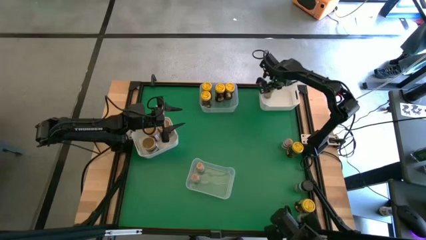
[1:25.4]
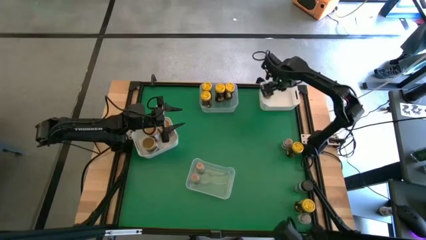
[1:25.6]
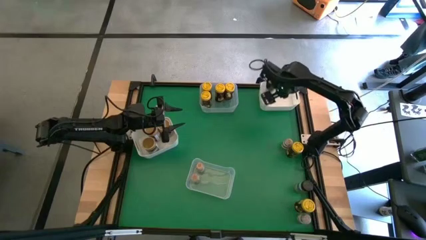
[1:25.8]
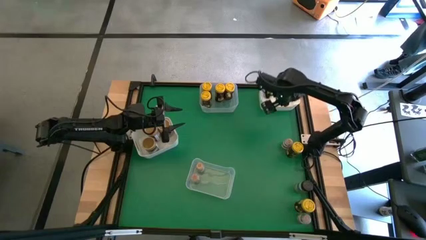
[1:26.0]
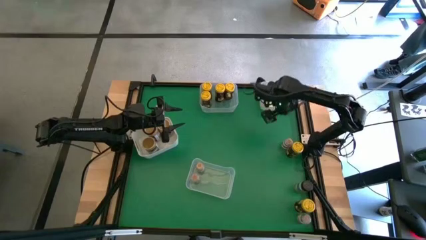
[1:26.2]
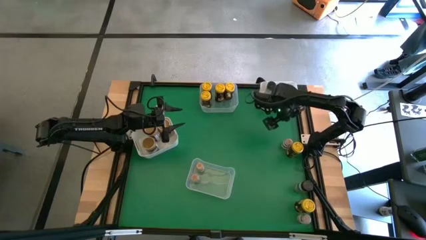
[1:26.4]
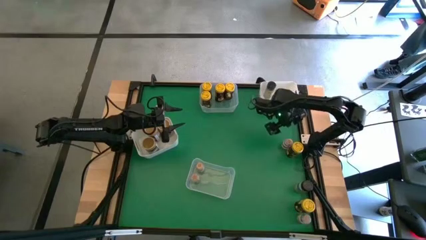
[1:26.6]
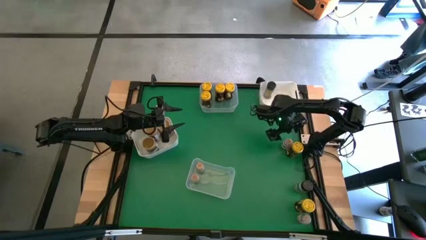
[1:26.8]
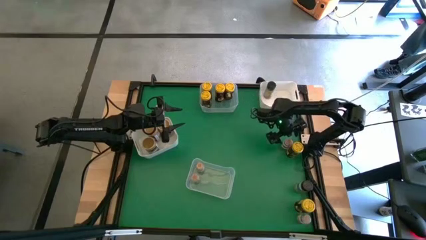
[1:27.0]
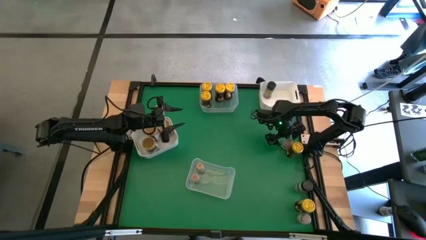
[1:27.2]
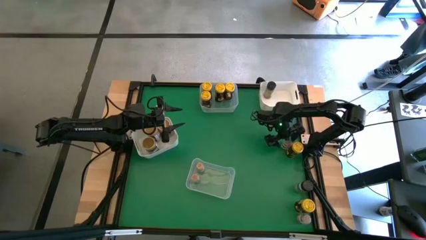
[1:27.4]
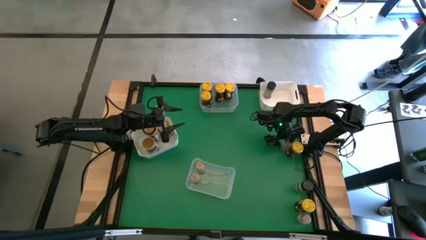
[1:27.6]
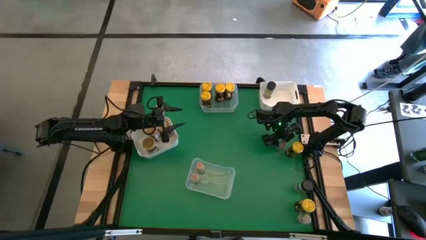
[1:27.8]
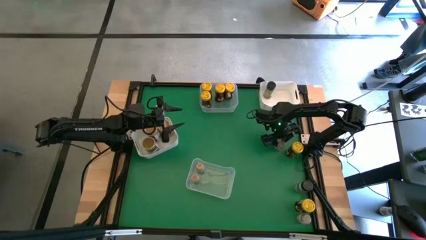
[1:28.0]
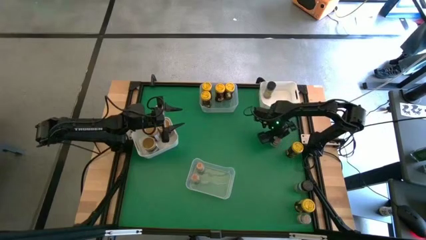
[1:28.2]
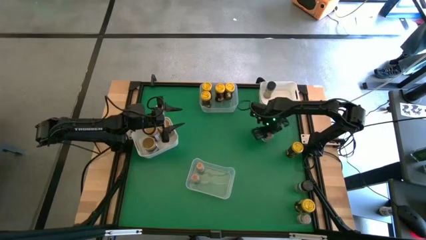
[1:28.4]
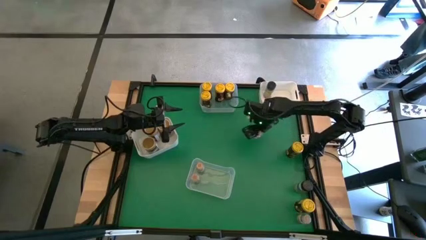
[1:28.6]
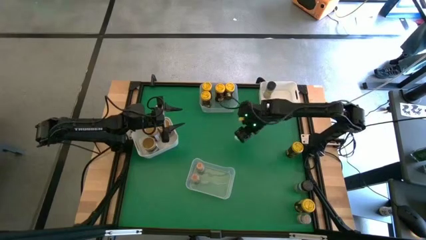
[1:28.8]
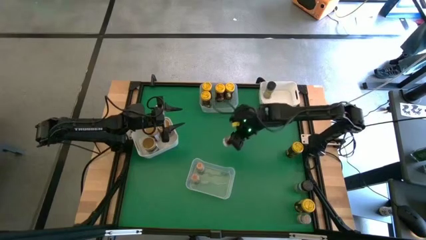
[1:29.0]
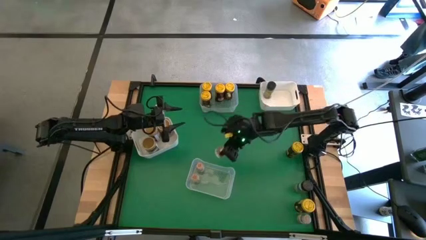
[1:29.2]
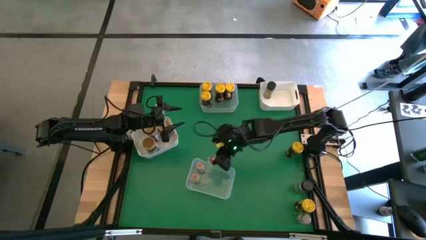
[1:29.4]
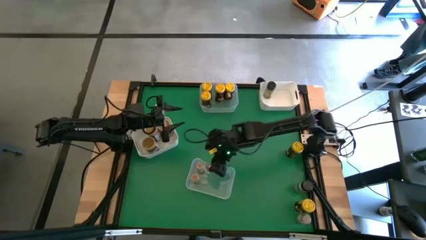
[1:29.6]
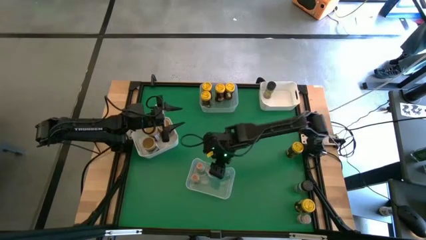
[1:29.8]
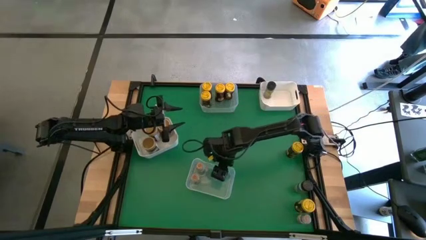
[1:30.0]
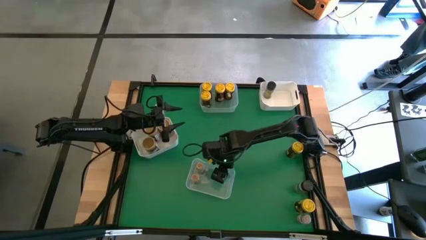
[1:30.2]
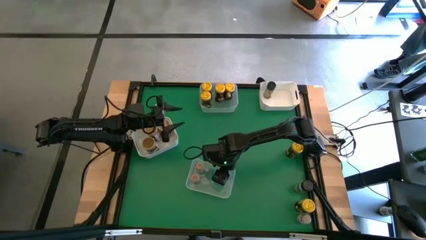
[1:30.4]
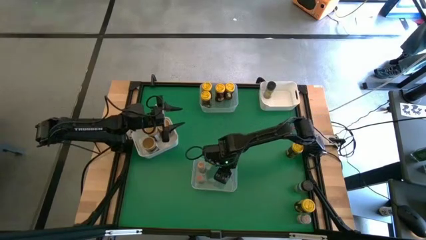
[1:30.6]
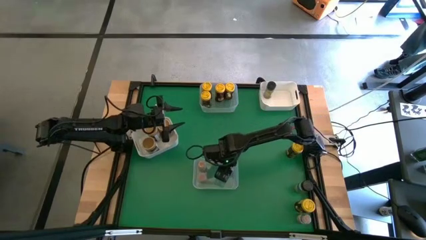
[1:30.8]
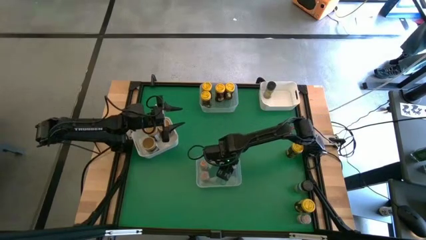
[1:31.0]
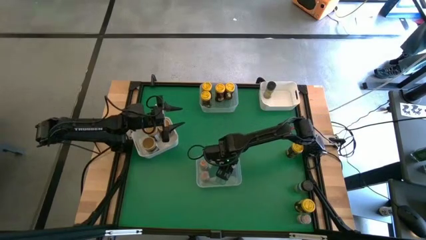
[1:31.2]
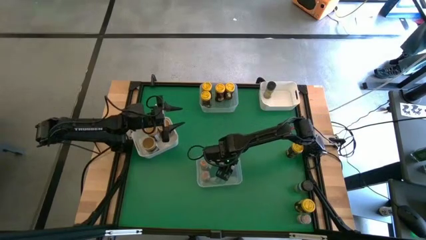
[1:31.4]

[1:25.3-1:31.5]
Task: Sort spices by type
Put the brown spice bottle into the bottom transparent bin

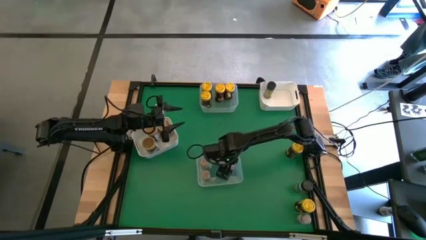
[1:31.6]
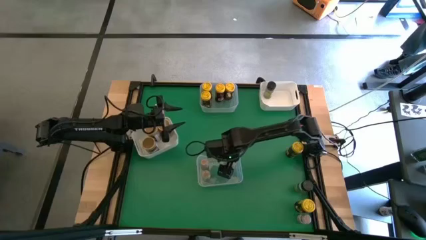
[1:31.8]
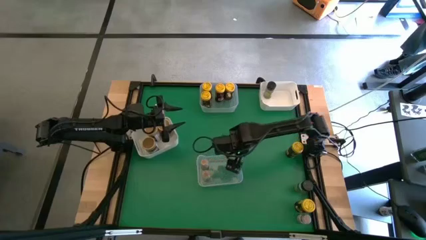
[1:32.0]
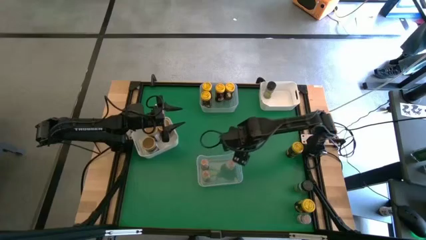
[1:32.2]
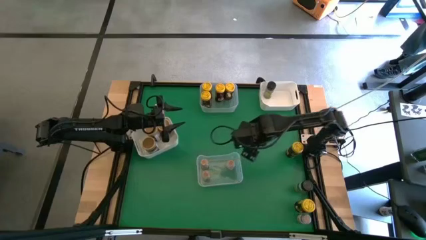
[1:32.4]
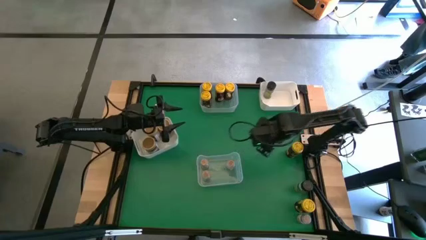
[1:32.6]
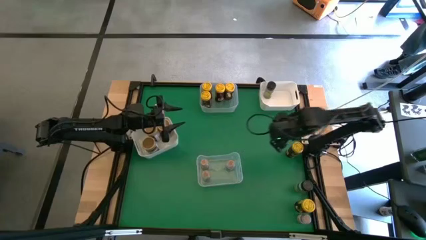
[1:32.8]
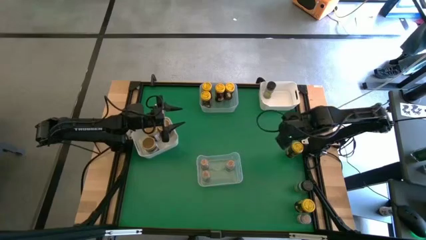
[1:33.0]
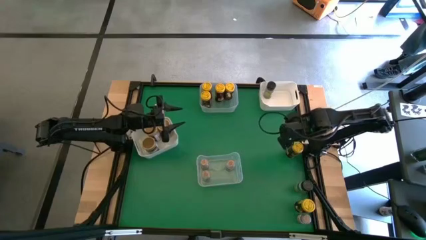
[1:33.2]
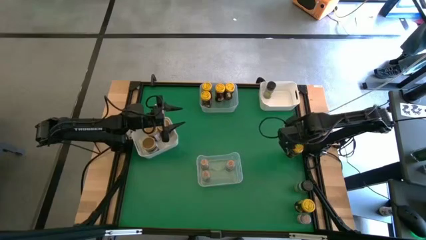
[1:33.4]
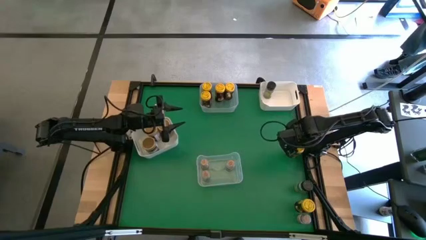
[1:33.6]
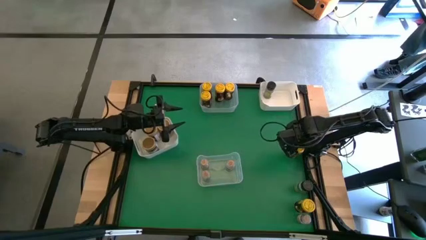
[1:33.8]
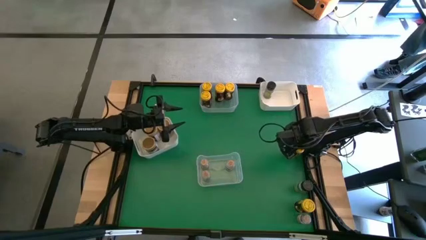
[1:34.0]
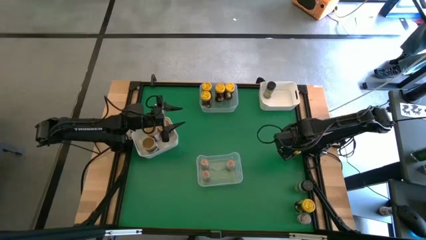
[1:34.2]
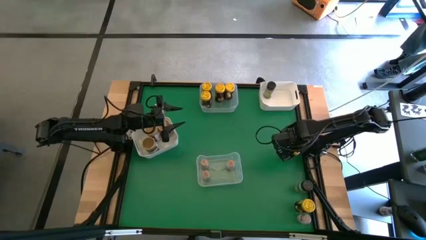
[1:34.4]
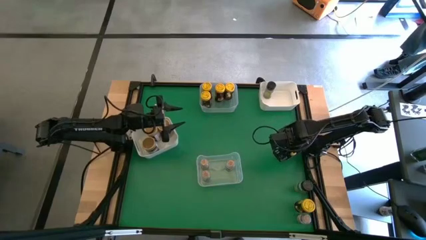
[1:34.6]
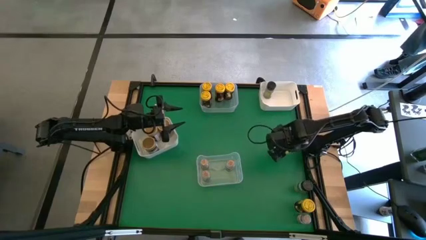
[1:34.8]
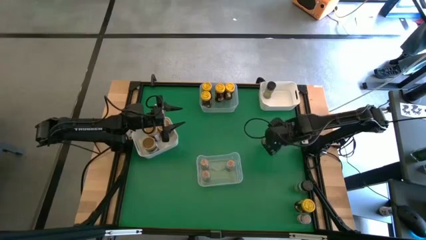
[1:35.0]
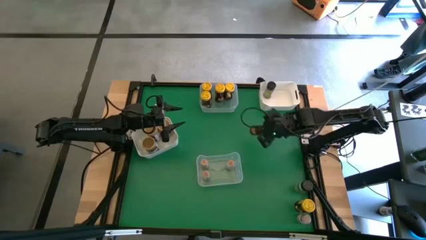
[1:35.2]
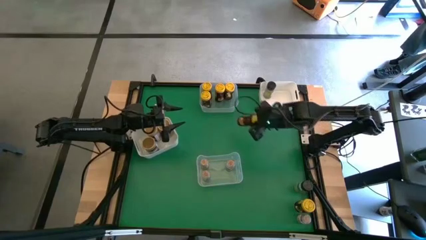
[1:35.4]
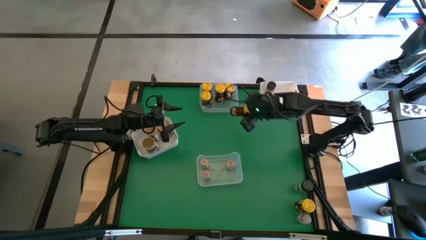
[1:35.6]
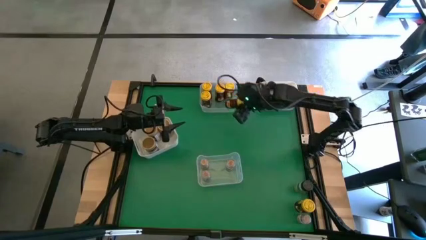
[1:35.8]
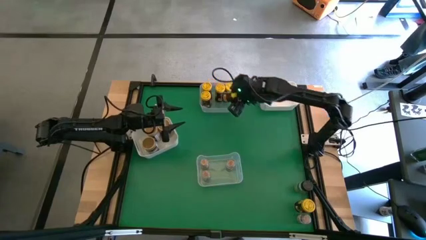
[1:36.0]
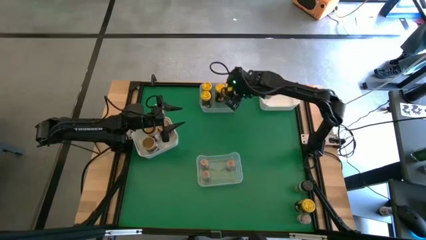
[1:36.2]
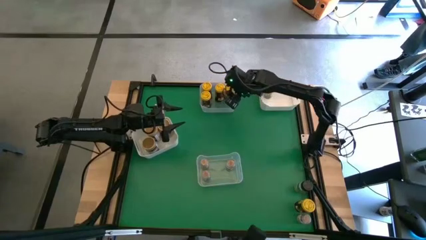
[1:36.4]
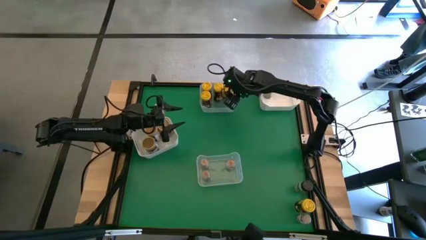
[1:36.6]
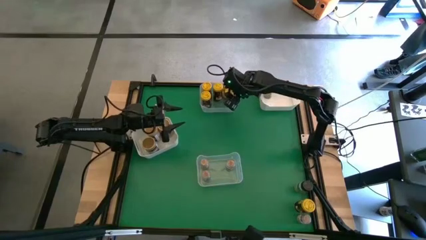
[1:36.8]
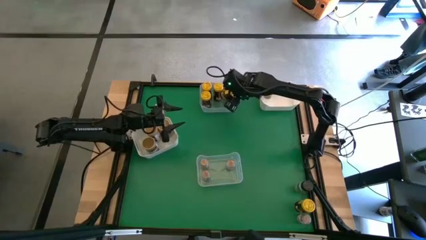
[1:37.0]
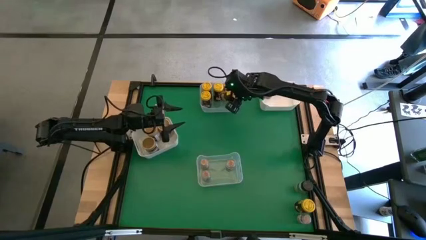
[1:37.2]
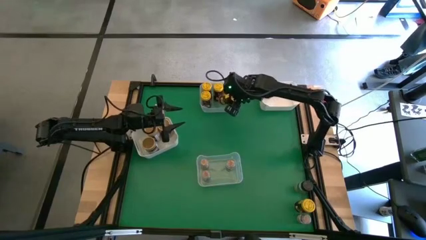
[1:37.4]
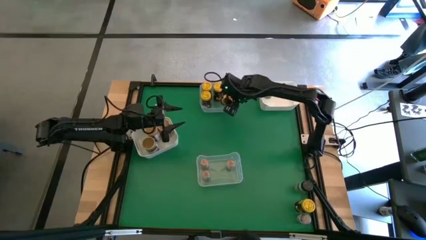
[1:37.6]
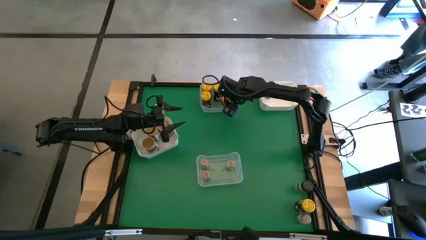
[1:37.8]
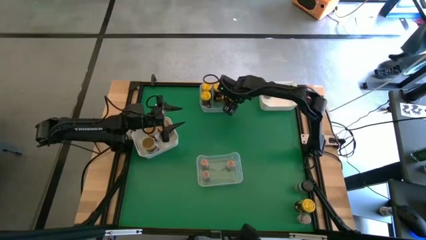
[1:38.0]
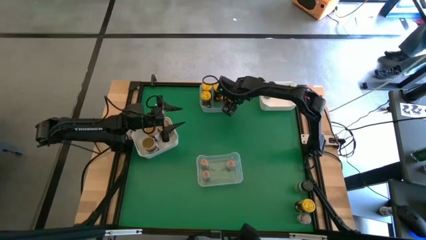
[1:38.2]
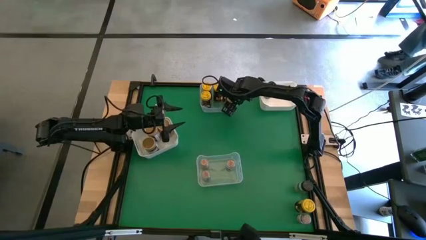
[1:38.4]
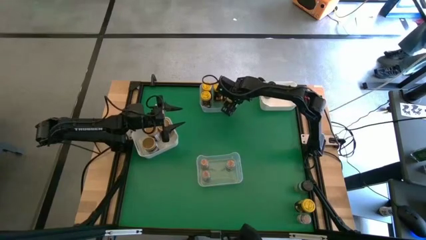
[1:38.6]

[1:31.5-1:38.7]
Put the yellow spice bottle into the top transparent bin

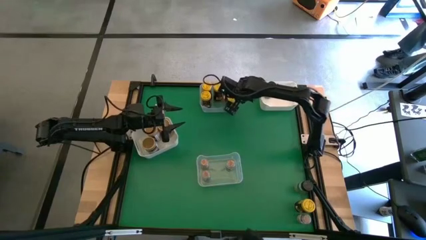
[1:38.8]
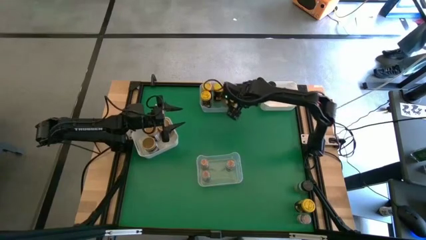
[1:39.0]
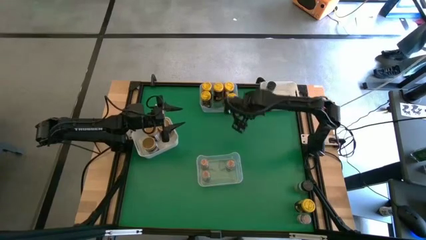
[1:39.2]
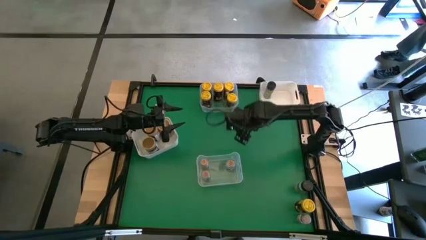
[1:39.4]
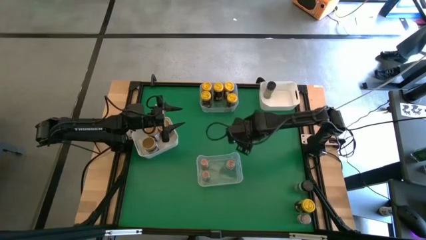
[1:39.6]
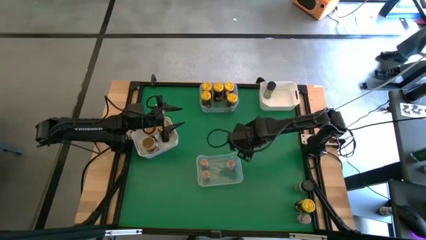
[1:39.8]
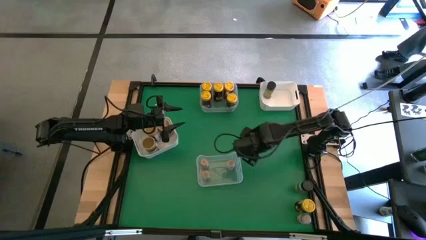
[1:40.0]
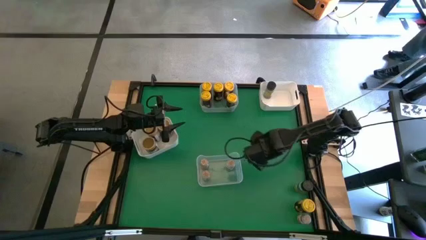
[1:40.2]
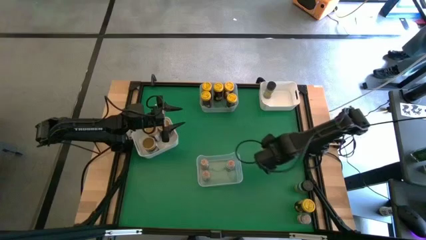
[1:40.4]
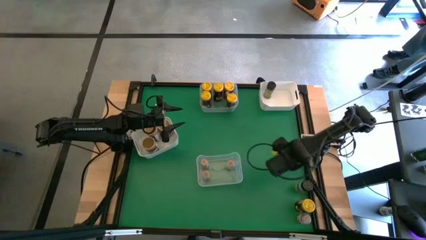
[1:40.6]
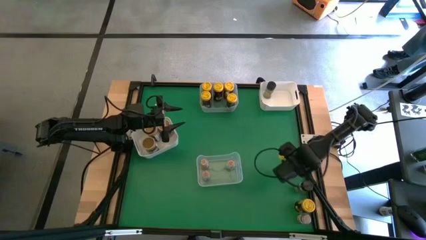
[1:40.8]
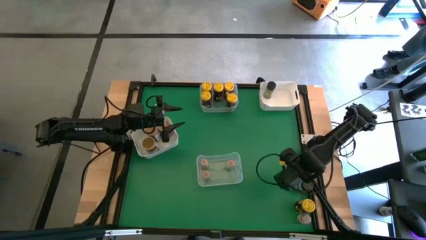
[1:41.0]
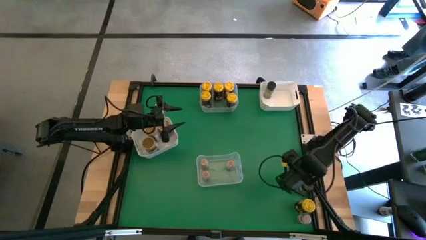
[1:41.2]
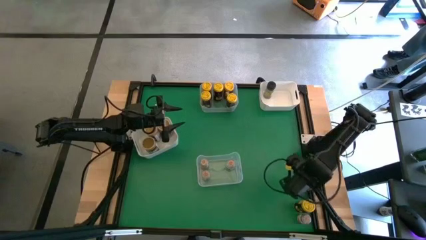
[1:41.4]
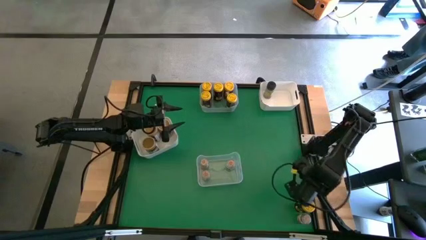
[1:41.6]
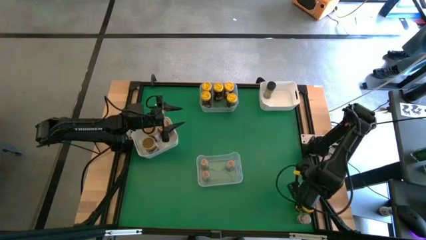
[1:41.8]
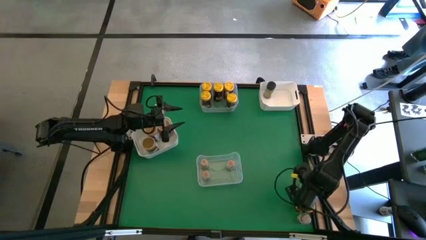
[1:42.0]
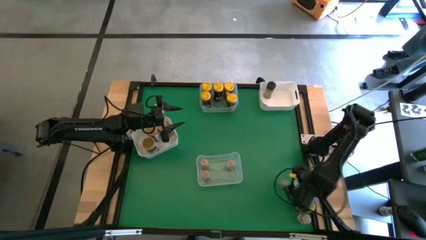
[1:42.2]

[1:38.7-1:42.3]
Put the black spice bottle into the right white bin
